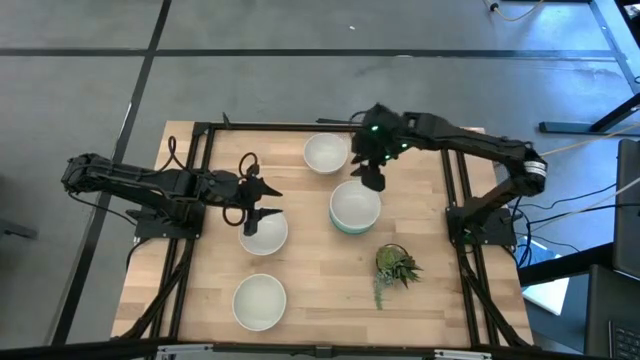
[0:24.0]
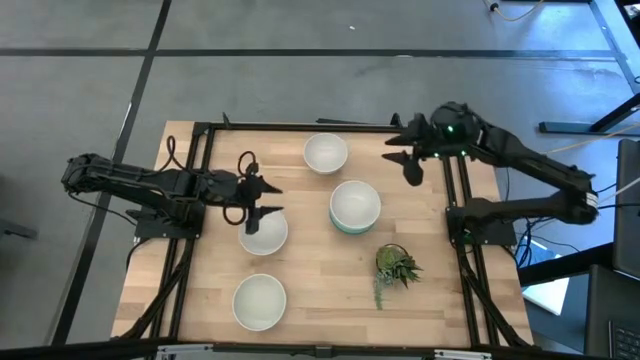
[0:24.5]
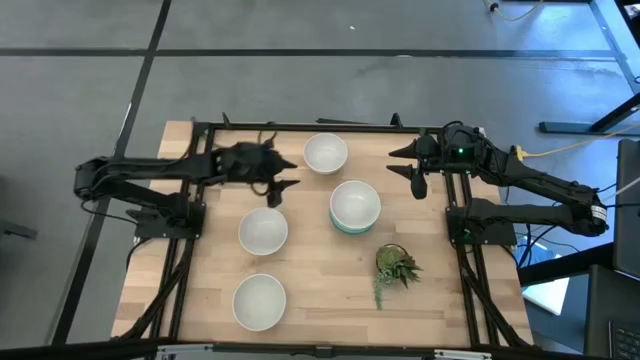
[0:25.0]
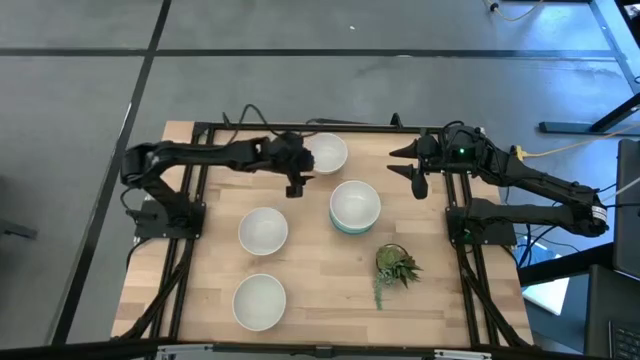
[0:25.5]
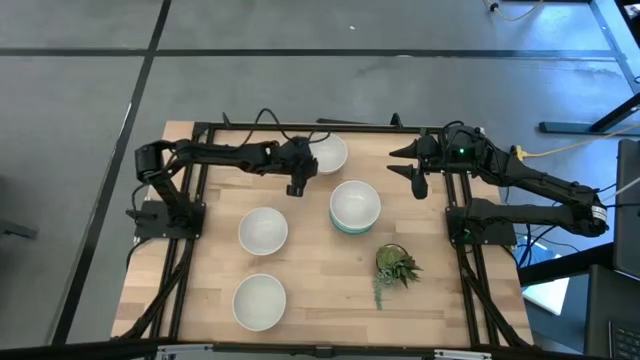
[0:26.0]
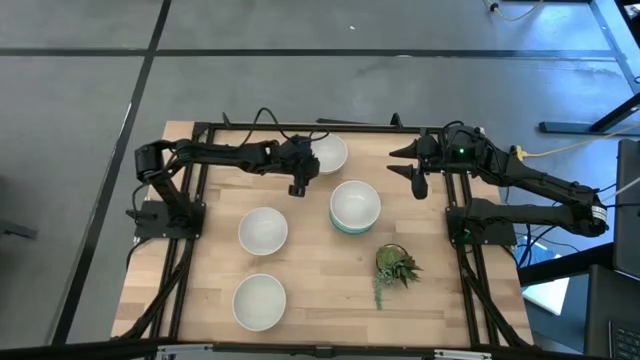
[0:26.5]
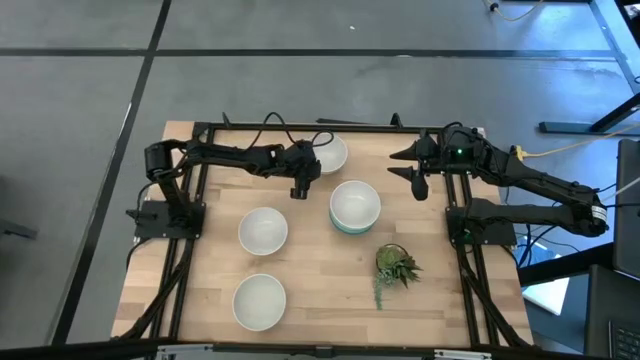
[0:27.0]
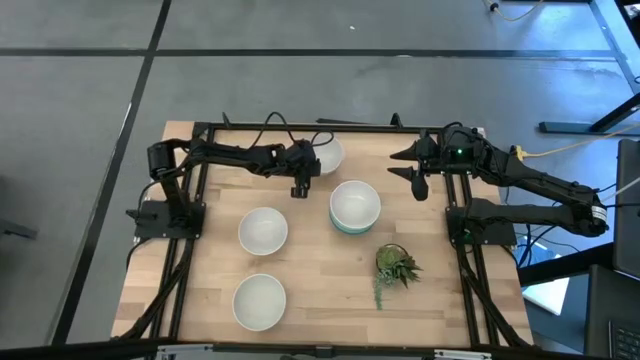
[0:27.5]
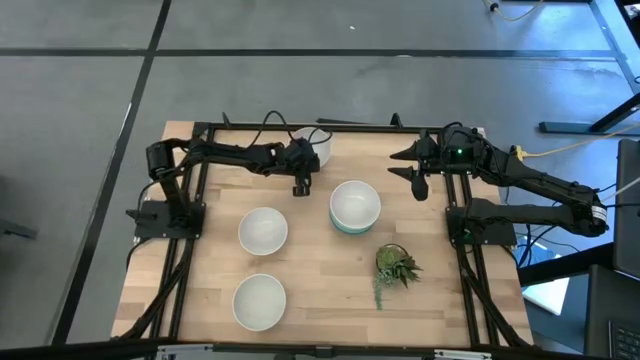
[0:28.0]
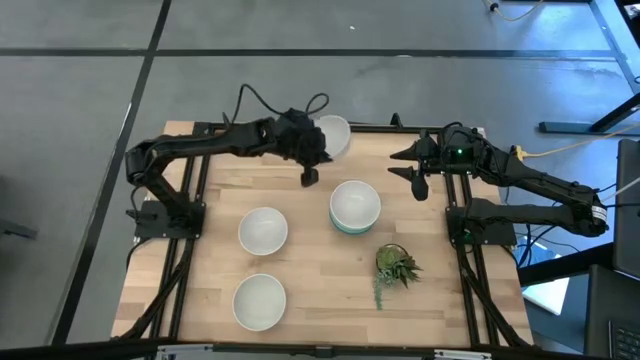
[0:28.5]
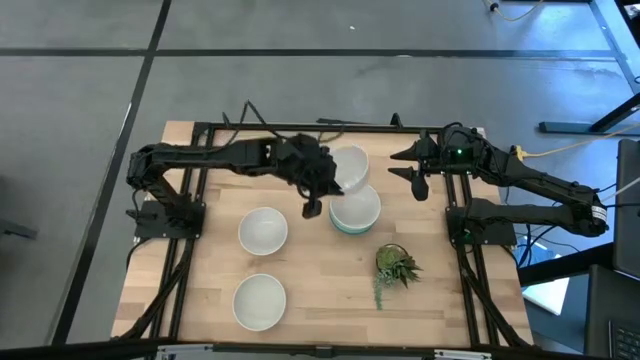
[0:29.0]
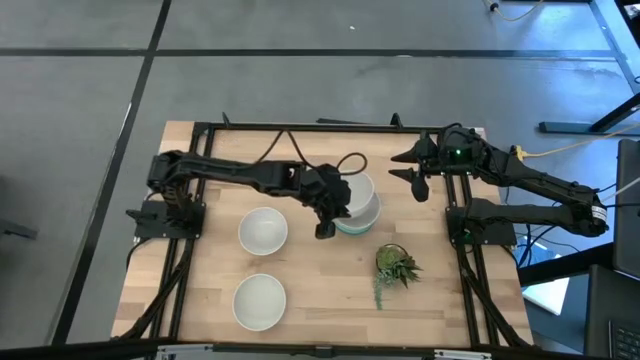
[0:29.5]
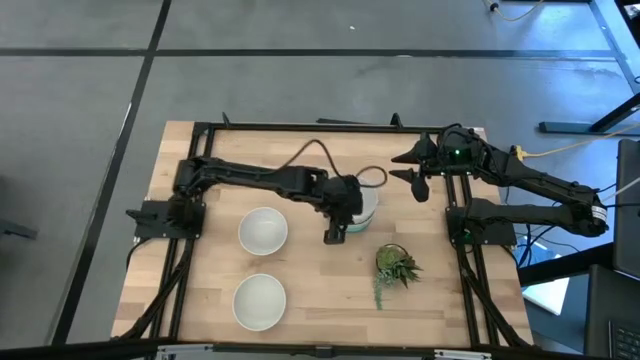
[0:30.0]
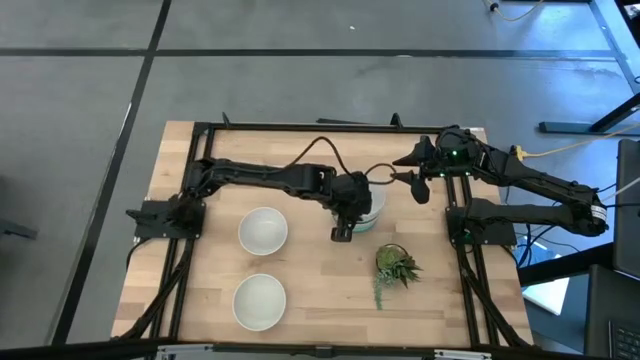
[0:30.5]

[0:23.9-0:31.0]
Task: Nest bowls inside each other
Stack the top white bowl on the middle right white bowl

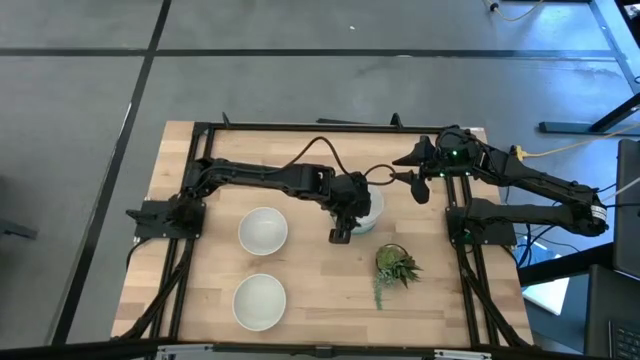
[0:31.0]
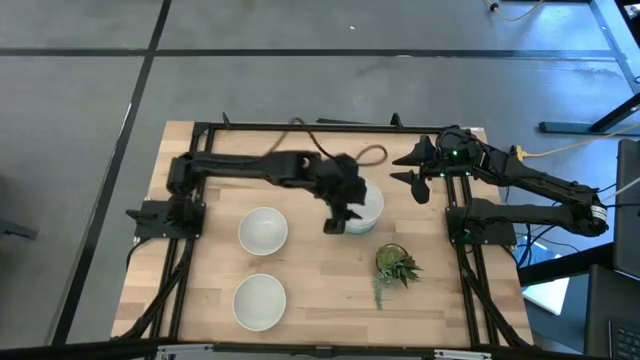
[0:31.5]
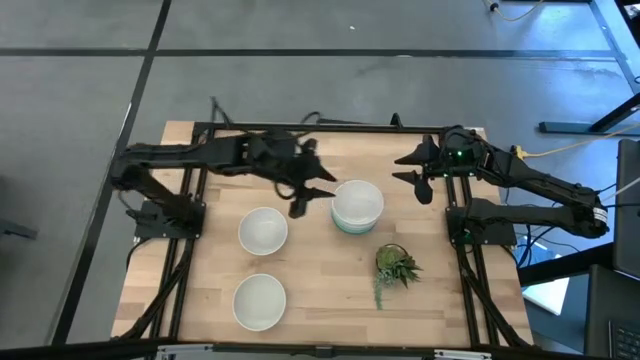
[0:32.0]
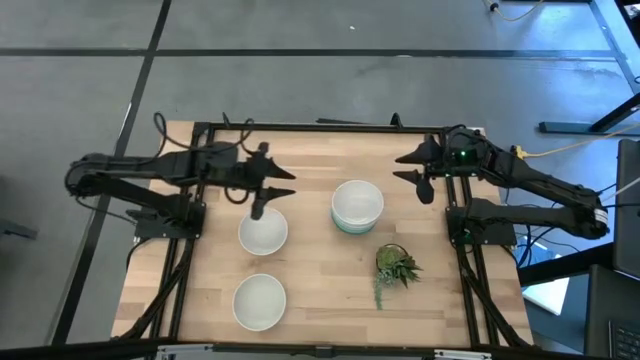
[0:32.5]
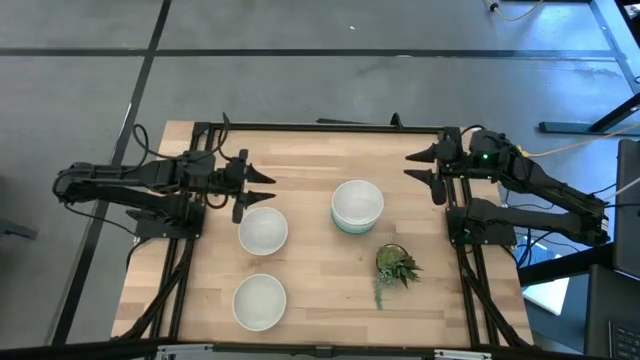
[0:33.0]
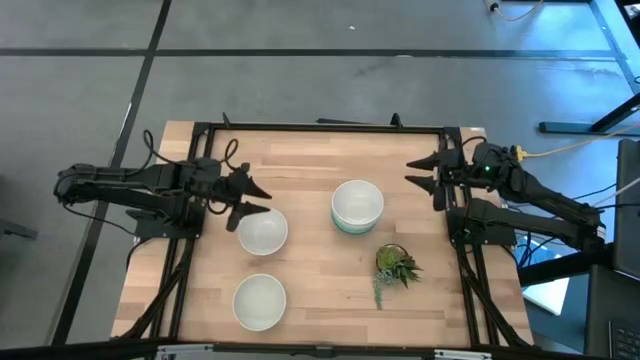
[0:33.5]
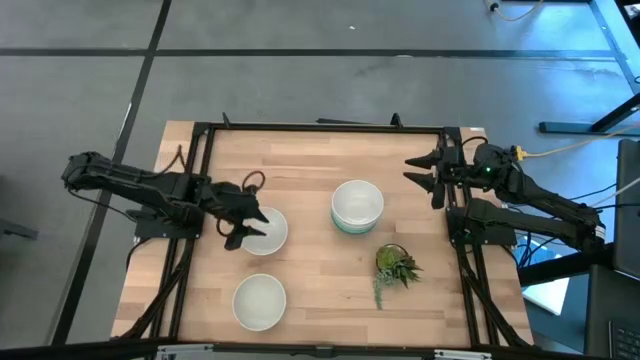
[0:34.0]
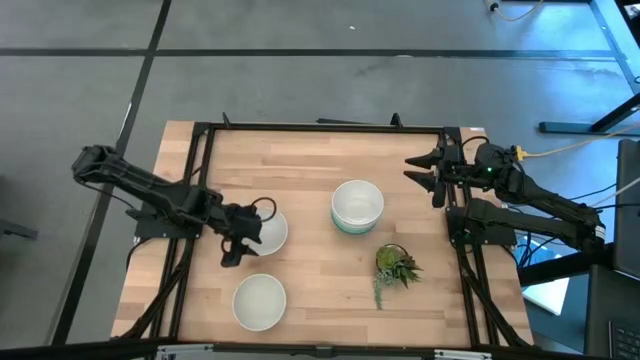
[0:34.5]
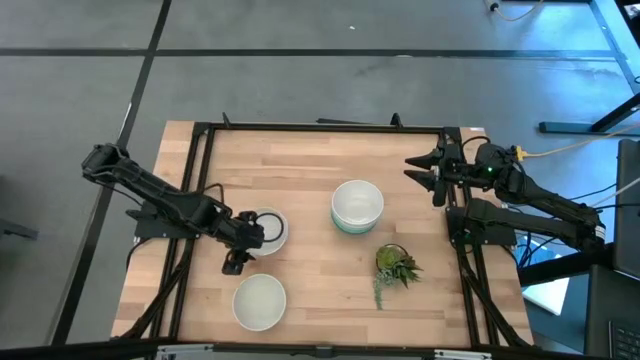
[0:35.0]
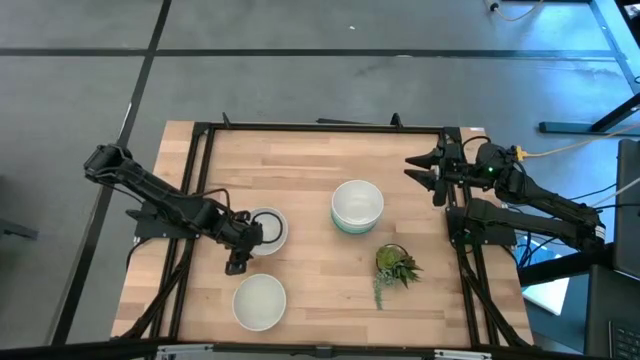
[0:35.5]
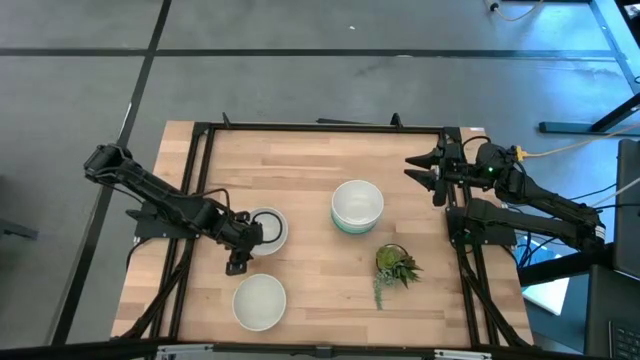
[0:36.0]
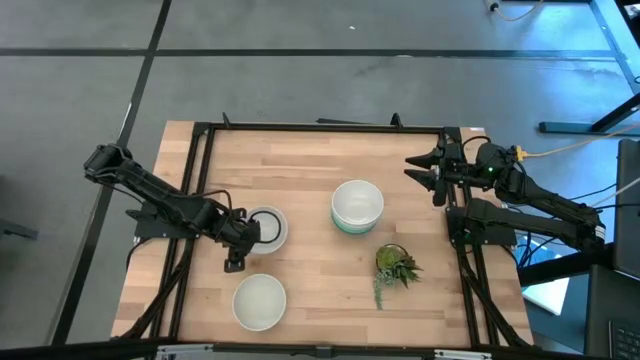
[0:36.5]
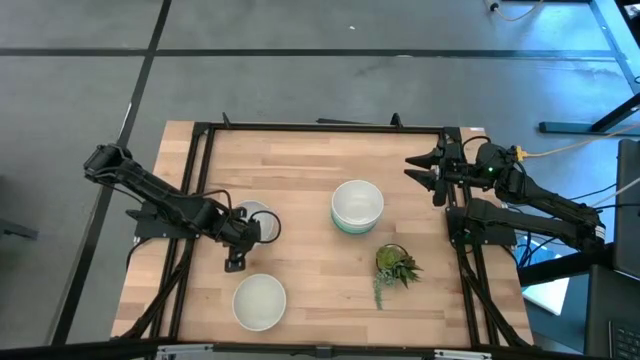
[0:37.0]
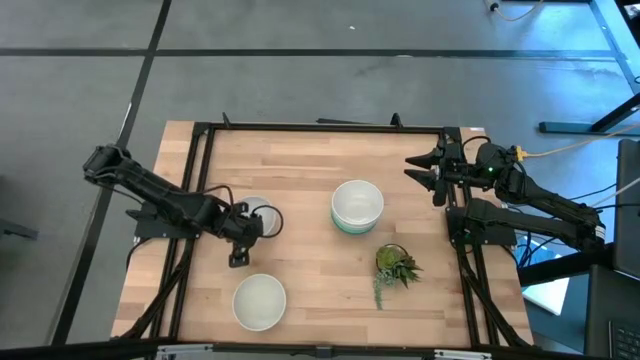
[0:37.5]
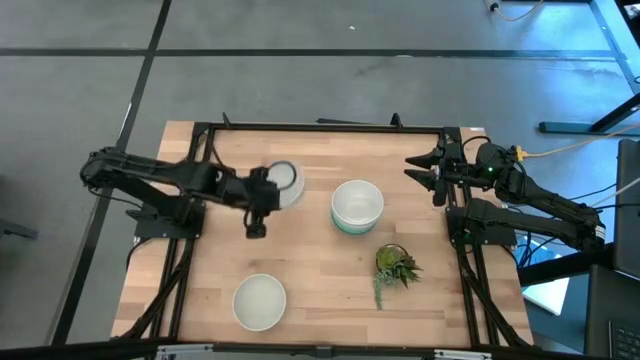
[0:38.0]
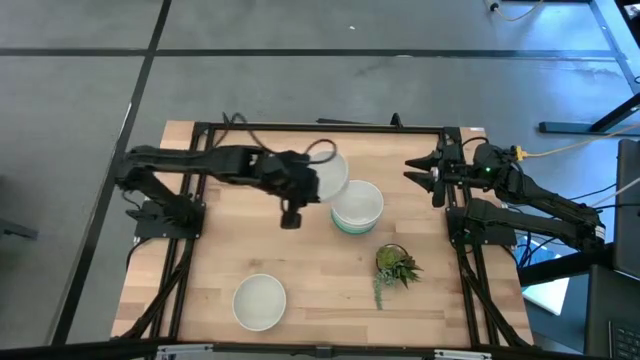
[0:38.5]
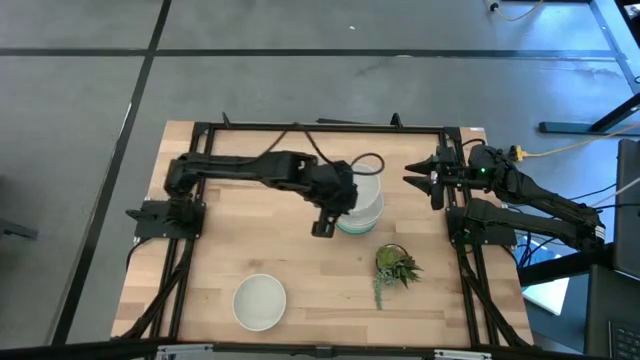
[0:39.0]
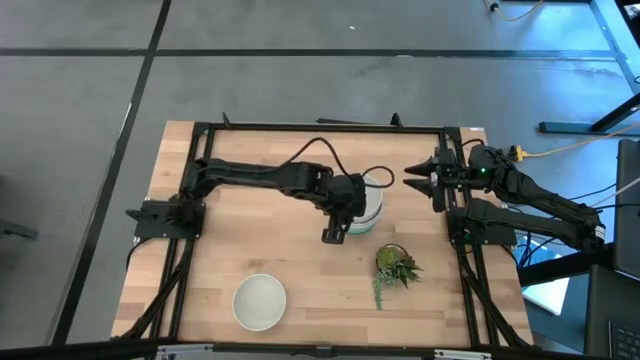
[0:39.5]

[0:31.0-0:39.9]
Stack the top left white bowl on the top right white bowl

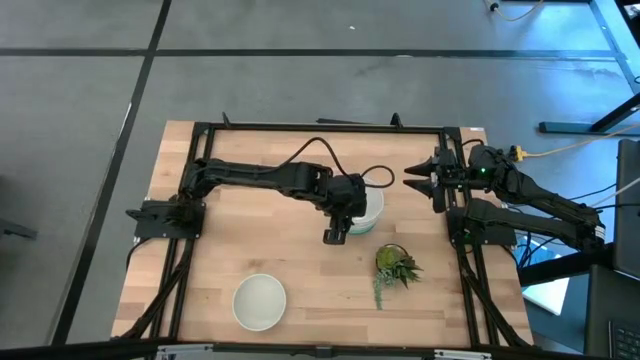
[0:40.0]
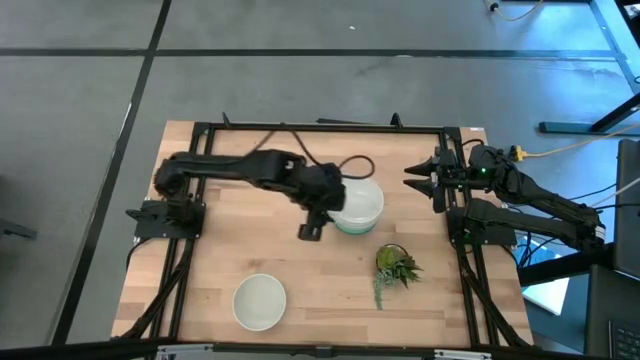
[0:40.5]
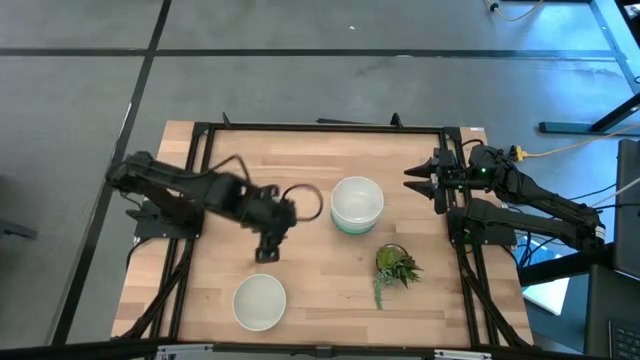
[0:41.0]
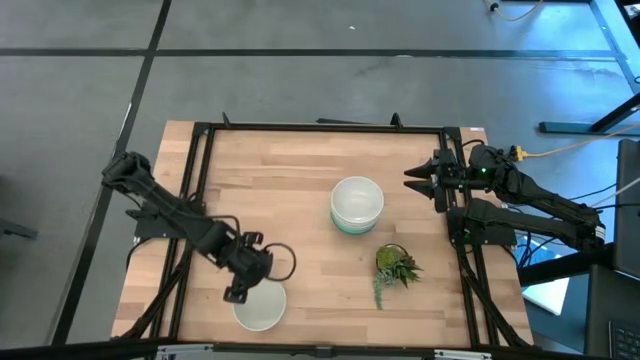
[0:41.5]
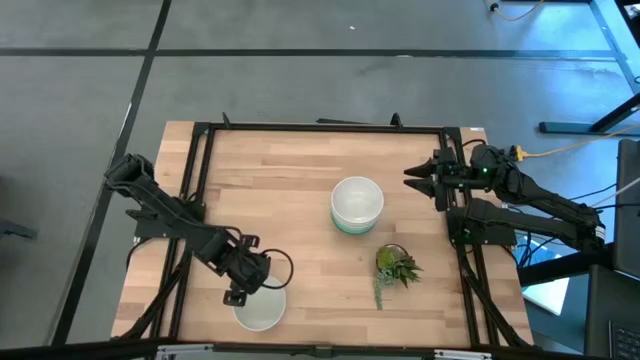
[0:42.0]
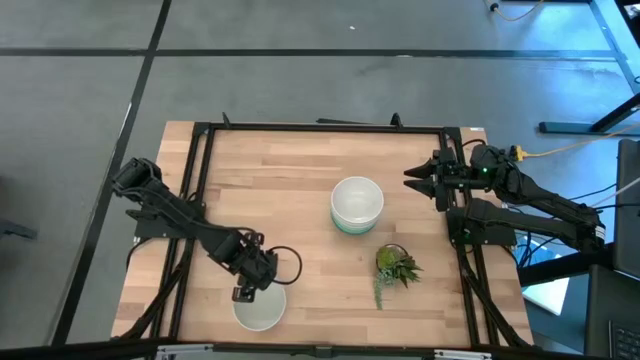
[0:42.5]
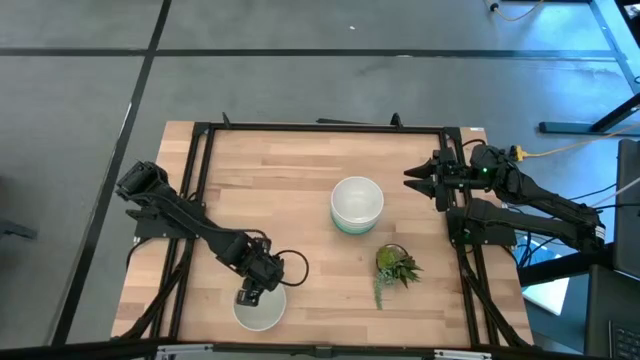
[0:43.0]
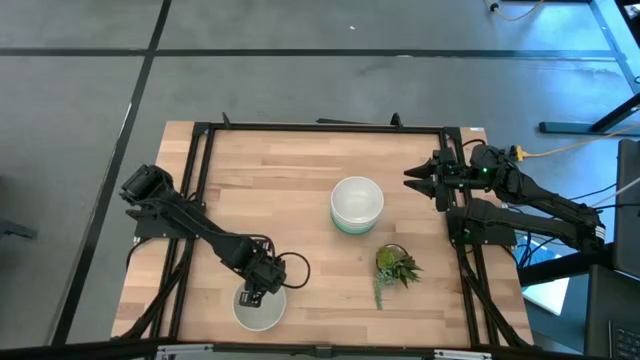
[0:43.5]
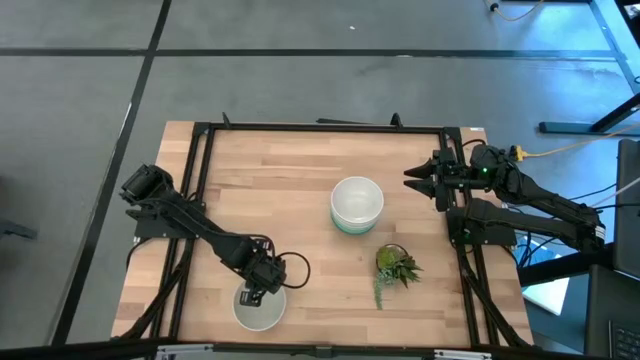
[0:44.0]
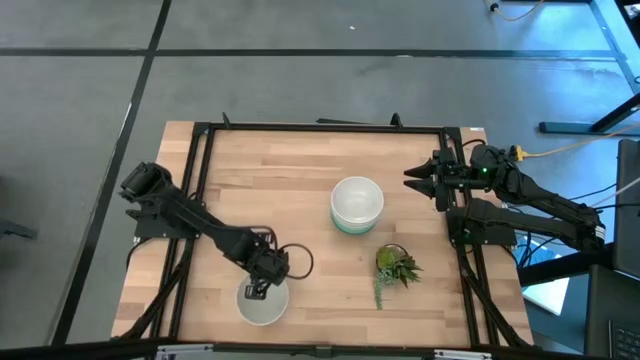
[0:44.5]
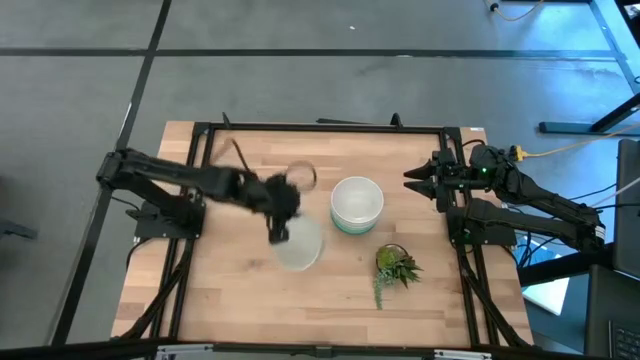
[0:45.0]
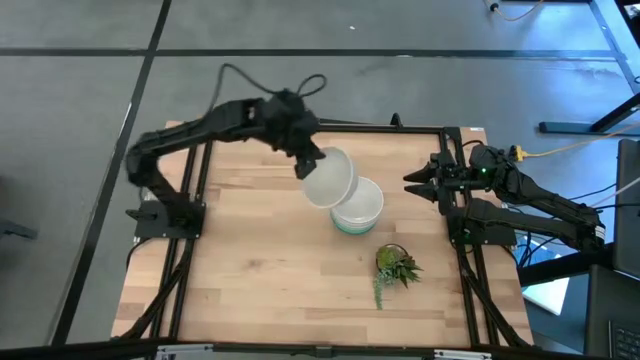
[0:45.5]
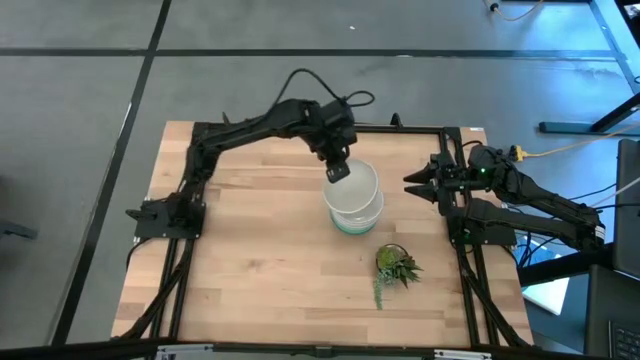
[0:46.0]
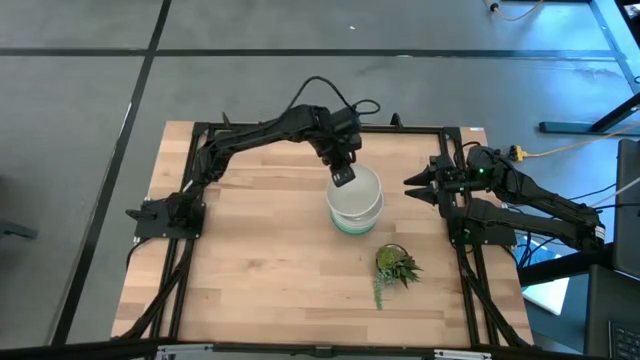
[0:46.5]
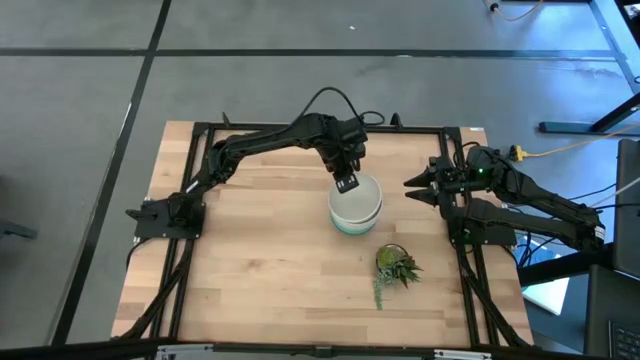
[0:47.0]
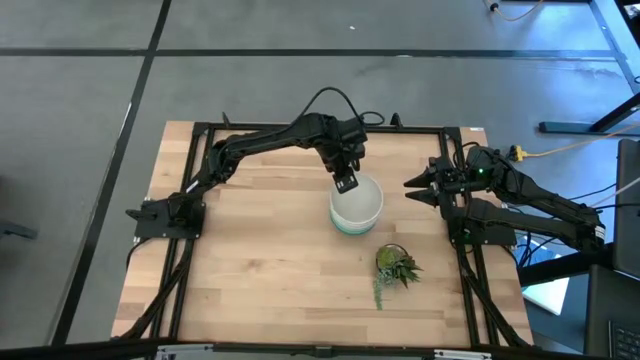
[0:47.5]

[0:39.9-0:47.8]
Stack the bottom white bowl on the top white bowl
